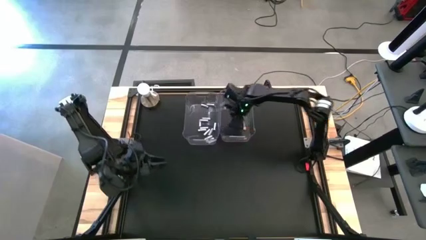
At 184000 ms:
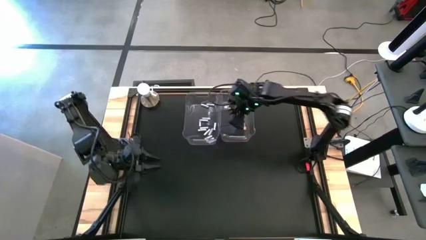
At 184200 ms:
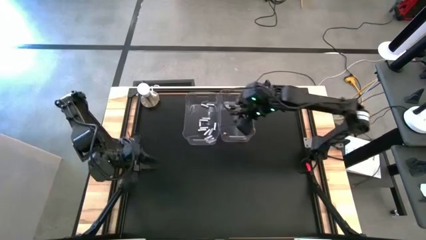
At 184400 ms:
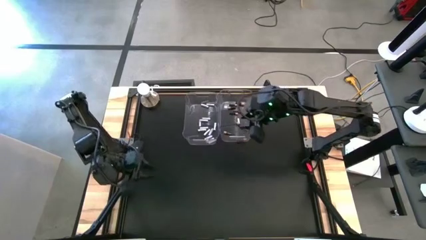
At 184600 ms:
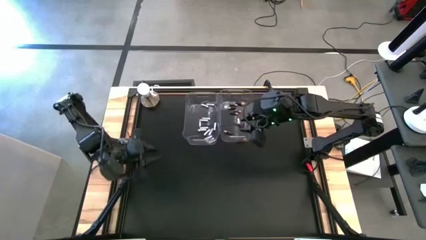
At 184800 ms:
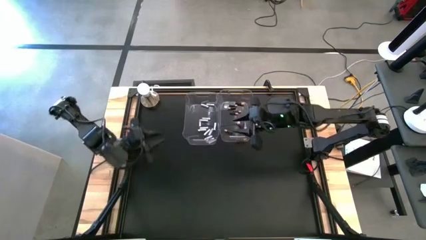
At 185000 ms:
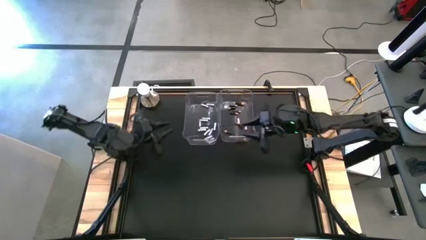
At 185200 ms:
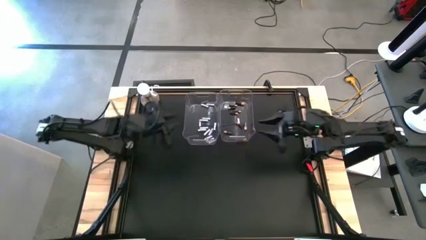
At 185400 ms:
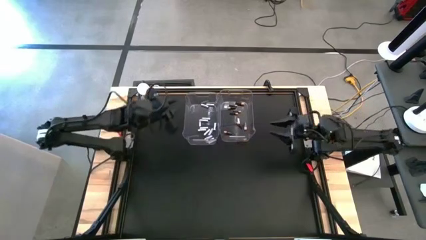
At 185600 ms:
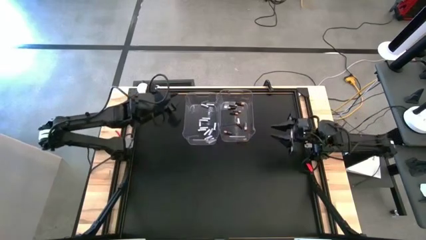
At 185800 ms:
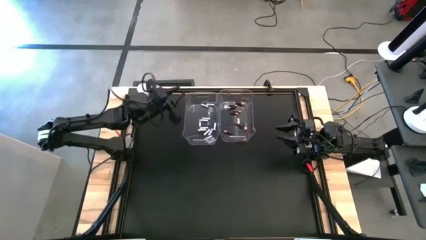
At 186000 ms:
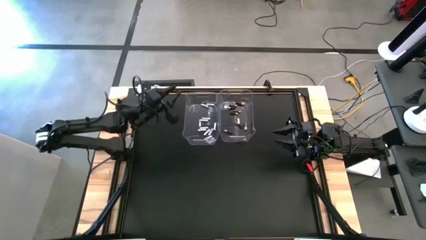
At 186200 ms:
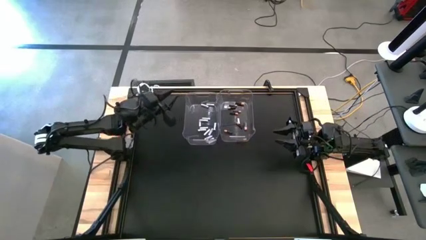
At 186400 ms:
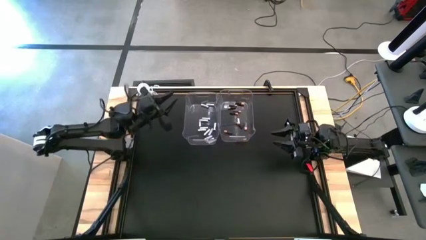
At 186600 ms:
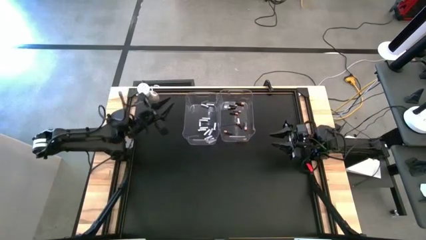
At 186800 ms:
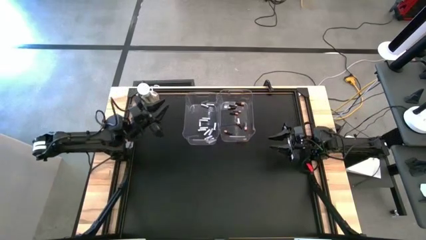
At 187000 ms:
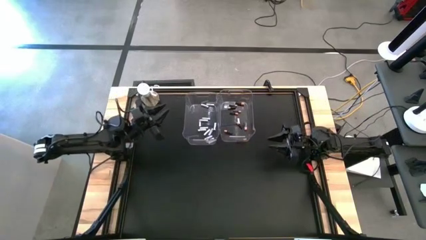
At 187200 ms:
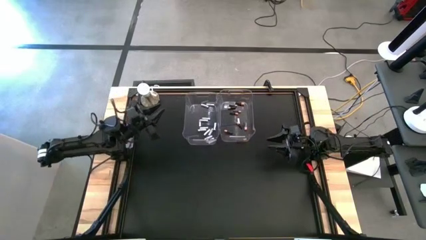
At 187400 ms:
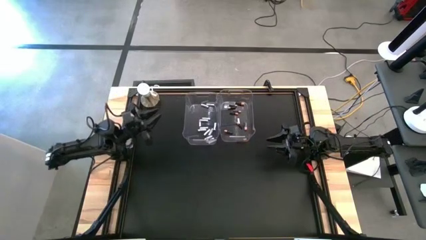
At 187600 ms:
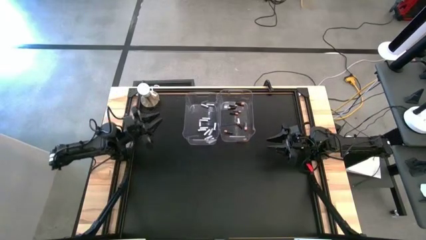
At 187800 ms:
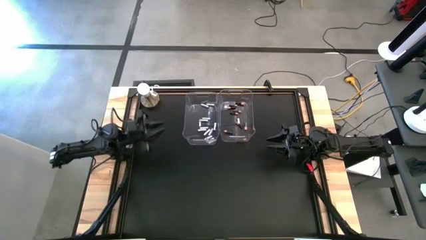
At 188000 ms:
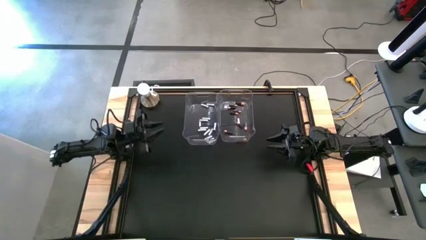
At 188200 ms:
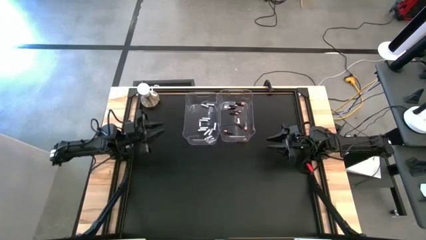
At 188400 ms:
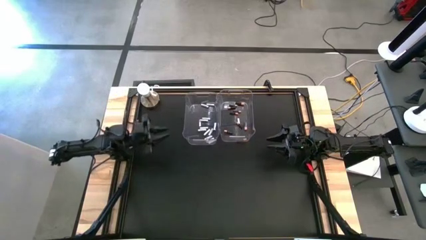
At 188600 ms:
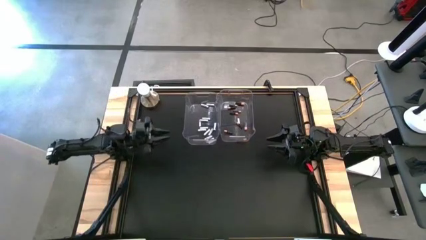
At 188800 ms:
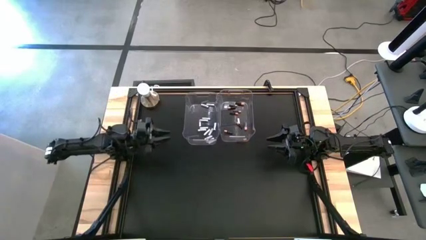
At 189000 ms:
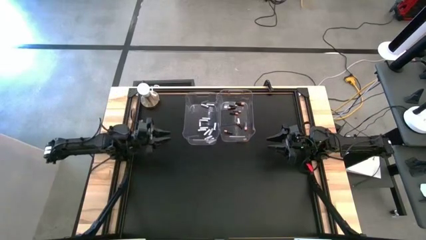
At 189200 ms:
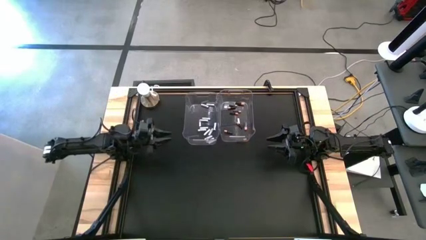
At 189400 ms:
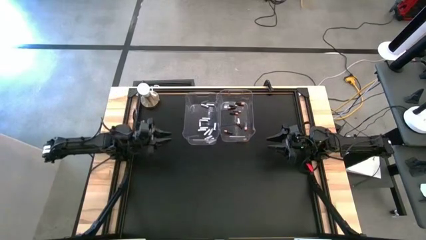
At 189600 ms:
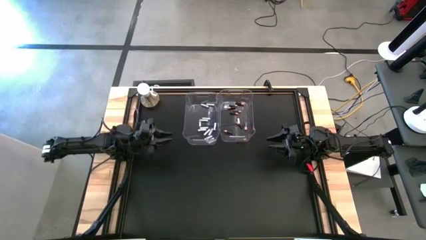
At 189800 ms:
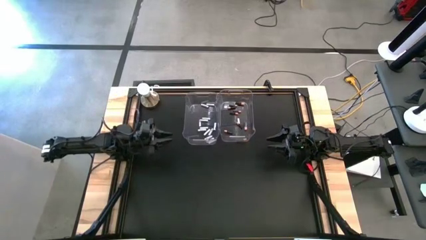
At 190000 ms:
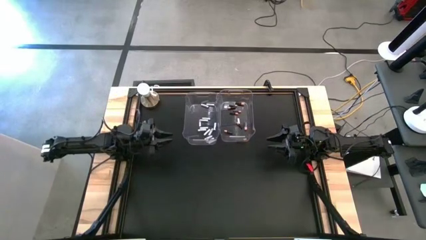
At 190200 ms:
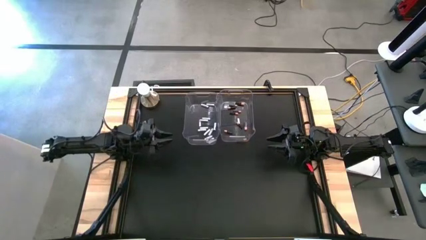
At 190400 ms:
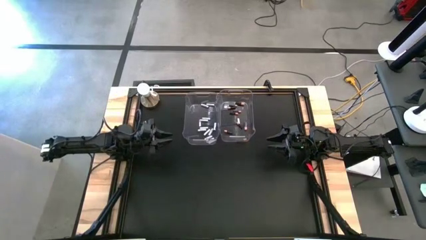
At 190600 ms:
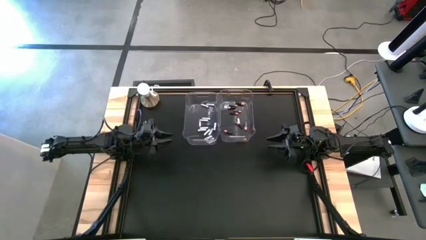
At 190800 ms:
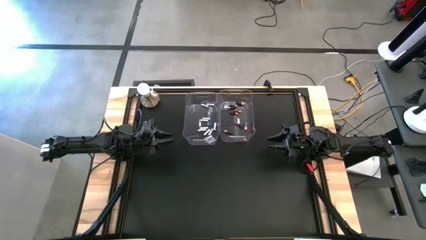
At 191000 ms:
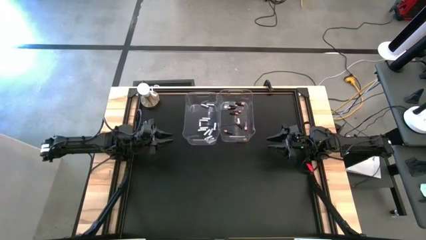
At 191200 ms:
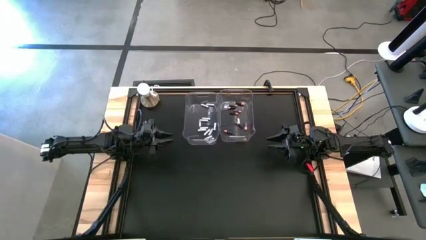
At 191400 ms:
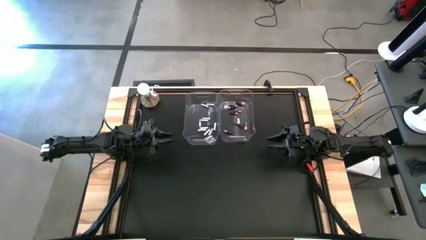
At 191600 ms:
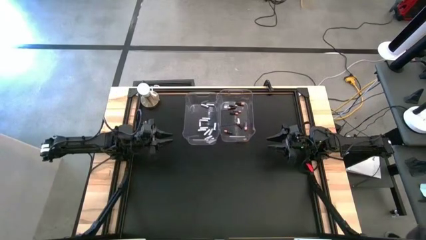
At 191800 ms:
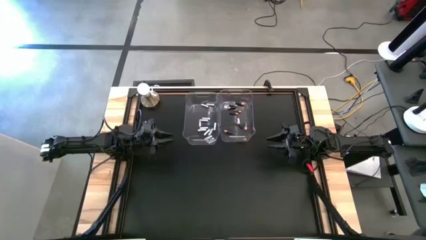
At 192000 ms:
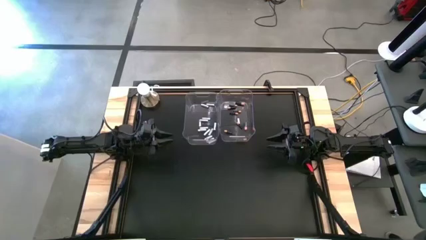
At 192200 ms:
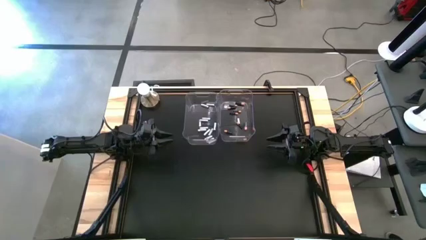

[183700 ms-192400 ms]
Task: Sort batteries
Return to Home Position

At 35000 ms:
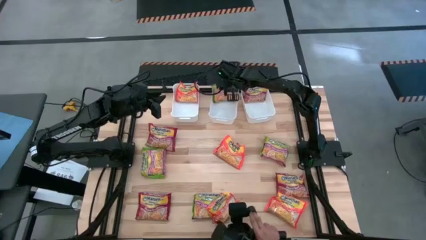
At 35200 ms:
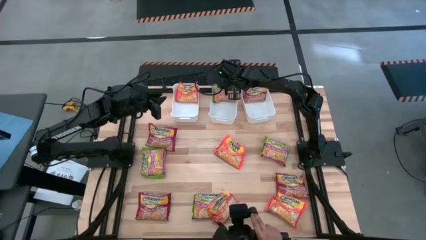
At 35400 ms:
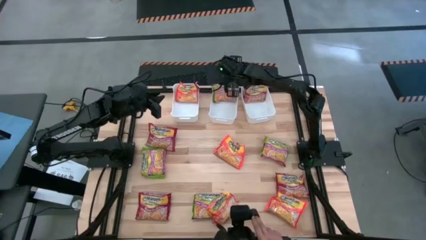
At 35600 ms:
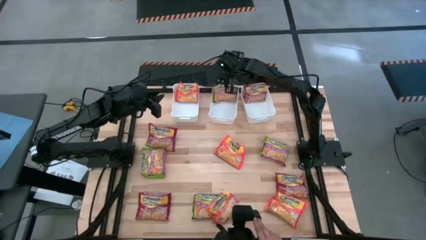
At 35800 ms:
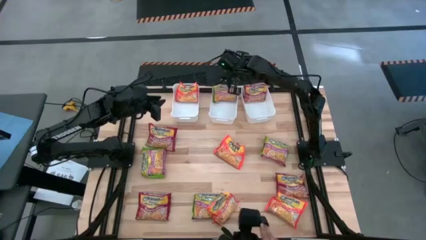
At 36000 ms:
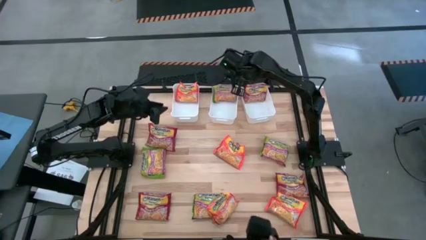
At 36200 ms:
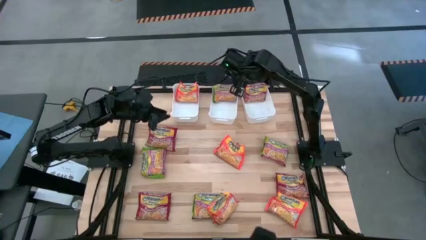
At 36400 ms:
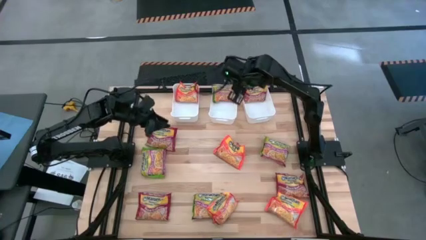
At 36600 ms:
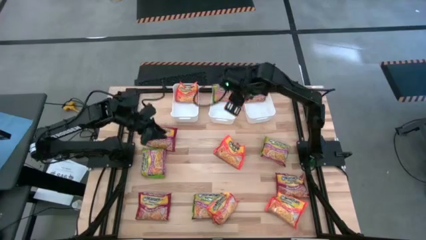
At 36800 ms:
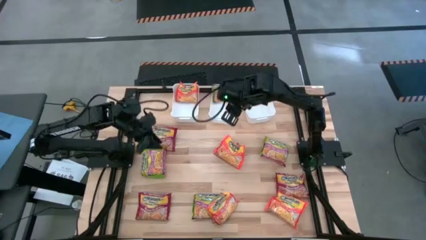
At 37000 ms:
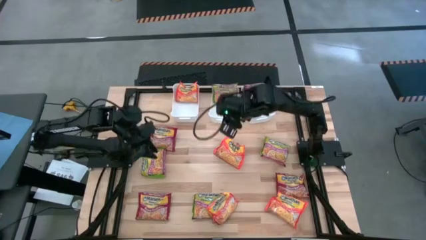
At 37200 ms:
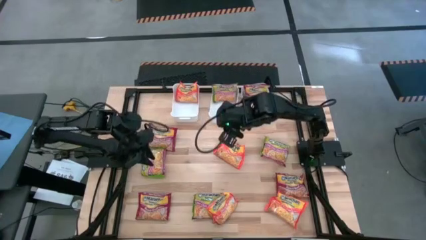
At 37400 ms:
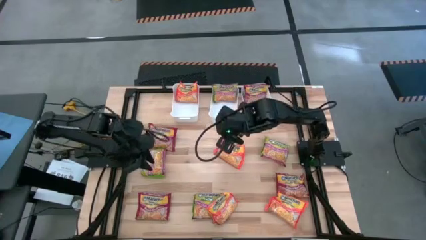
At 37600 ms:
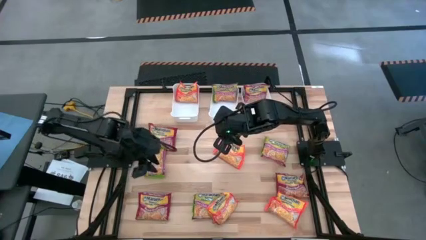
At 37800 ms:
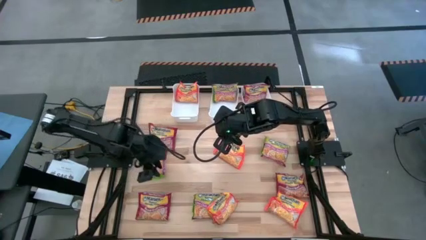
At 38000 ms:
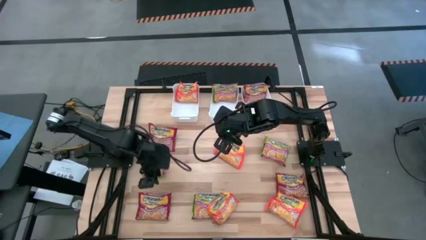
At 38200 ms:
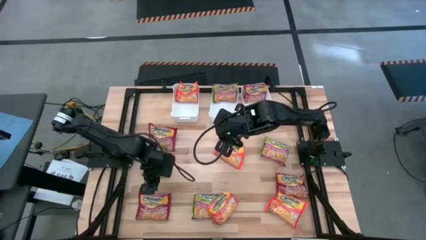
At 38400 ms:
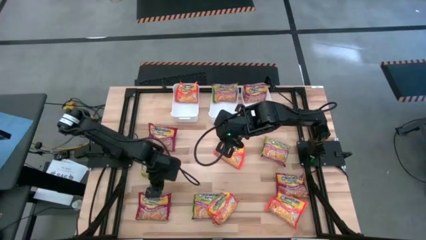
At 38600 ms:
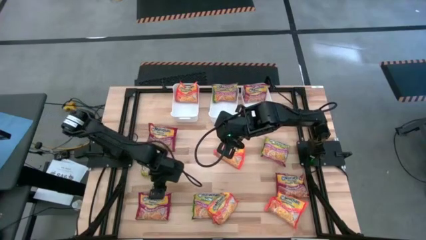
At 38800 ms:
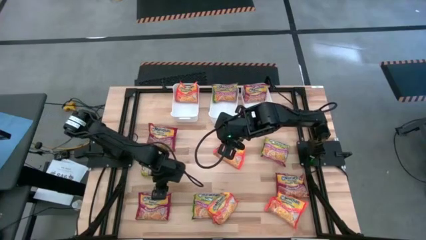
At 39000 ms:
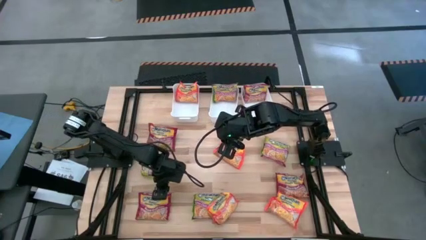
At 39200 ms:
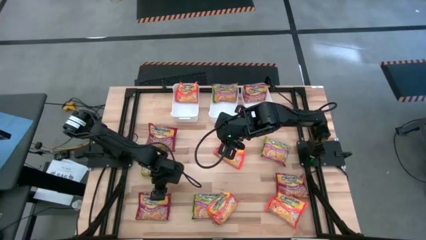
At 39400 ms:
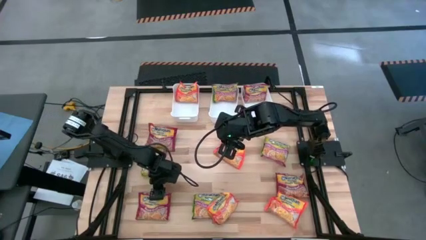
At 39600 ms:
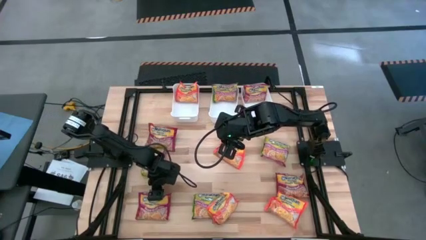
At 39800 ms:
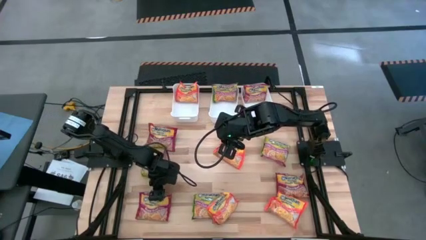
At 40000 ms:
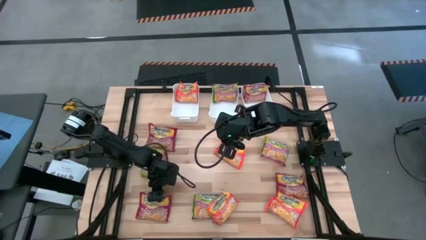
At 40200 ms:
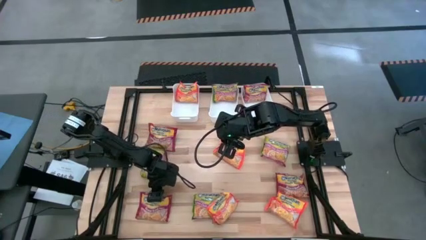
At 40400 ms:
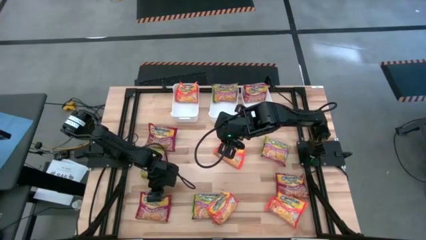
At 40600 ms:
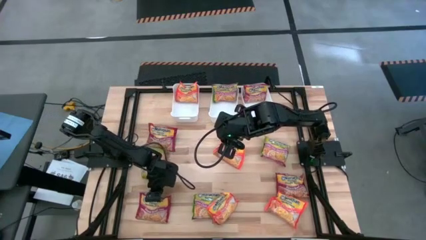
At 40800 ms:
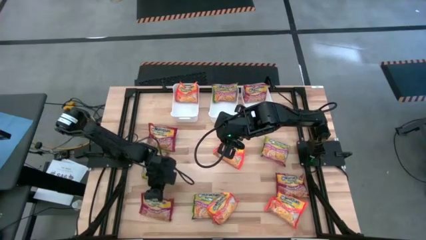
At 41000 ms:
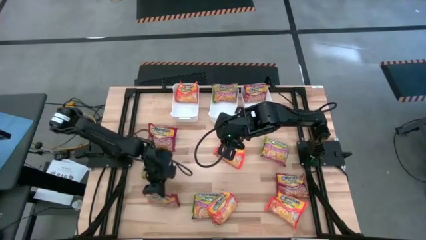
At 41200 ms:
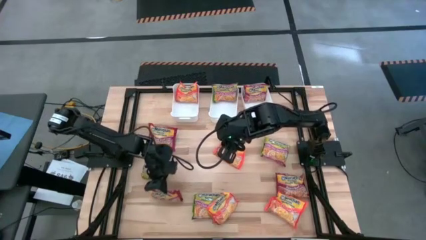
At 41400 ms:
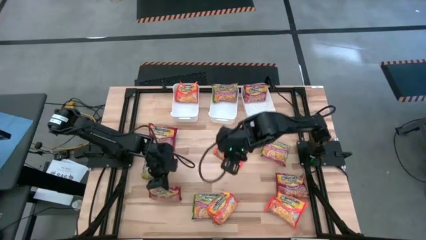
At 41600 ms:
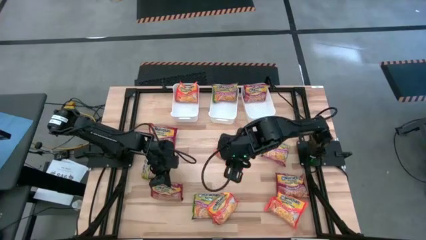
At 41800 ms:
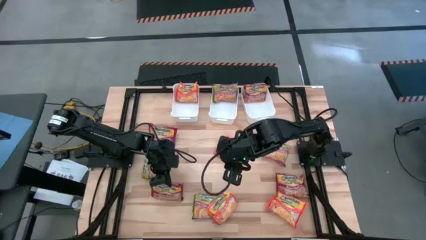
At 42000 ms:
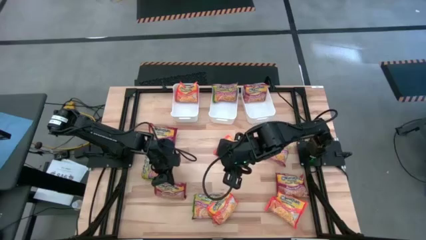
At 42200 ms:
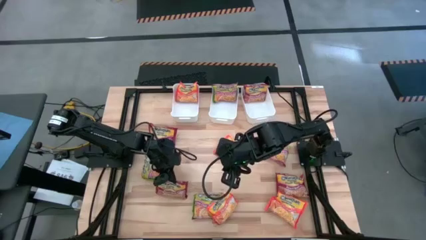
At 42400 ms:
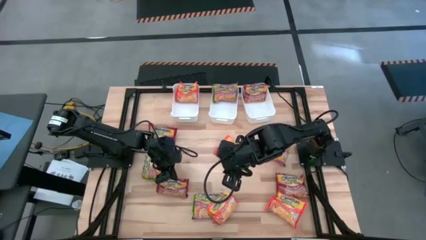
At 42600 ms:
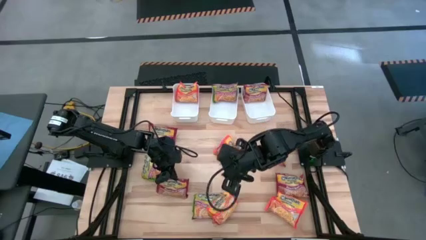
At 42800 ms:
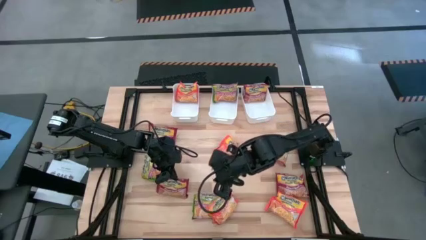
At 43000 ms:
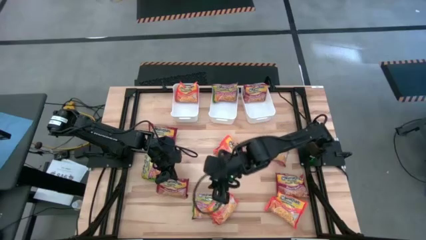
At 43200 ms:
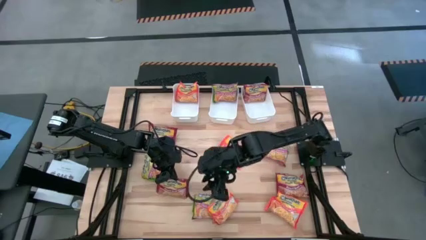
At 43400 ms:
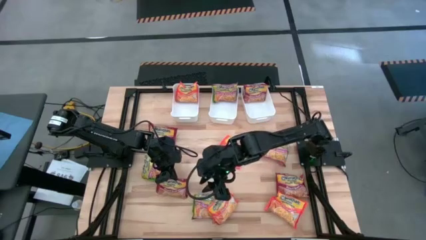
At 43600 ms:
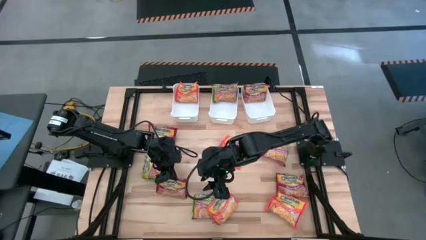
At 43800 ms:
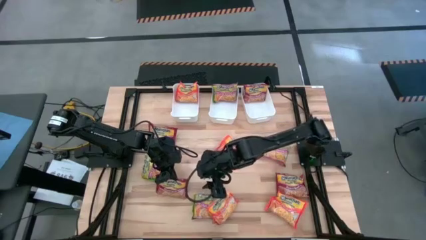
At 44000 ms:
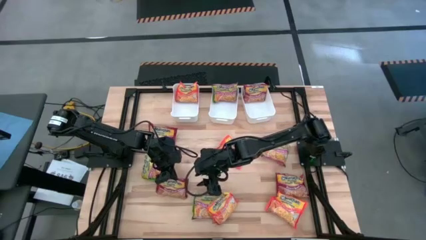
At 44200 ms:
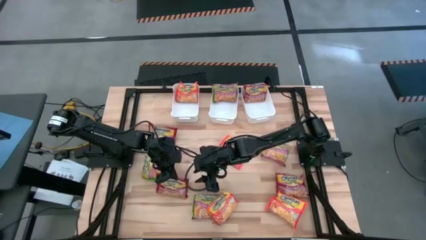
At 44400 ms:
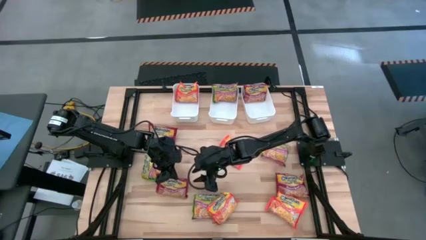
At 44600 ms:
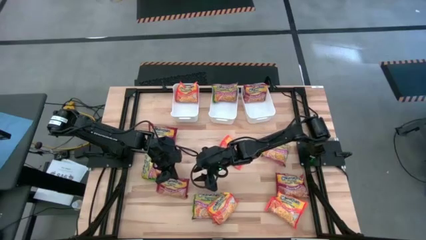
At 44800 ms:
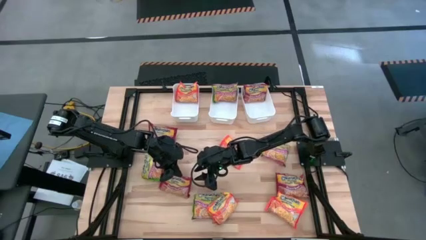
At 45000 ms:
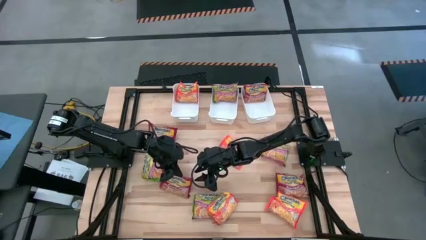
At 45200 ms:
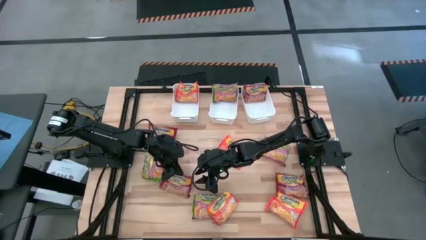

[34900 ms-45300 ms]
Task: Sort Maruchan noodles
Put the red noodle pack into the right white bin
